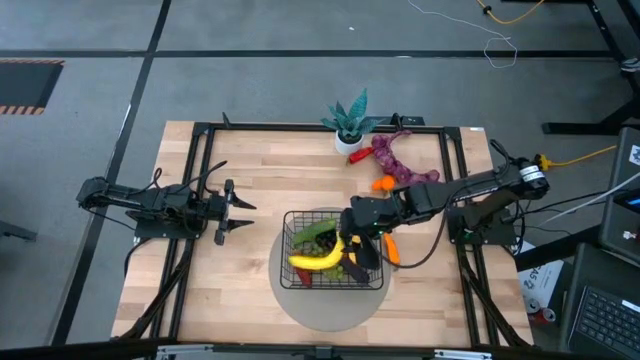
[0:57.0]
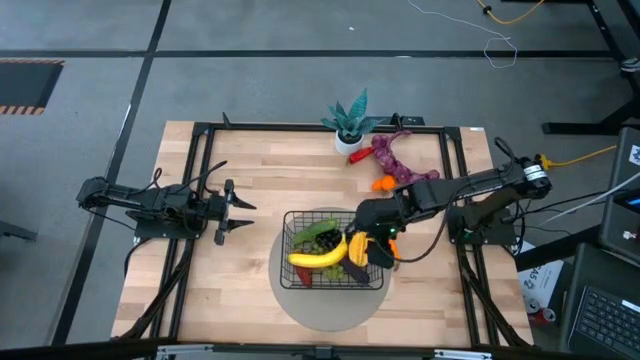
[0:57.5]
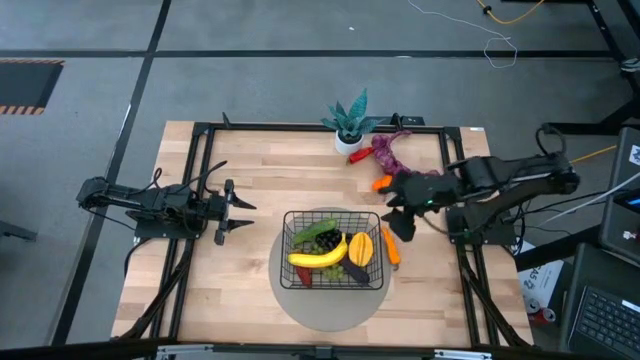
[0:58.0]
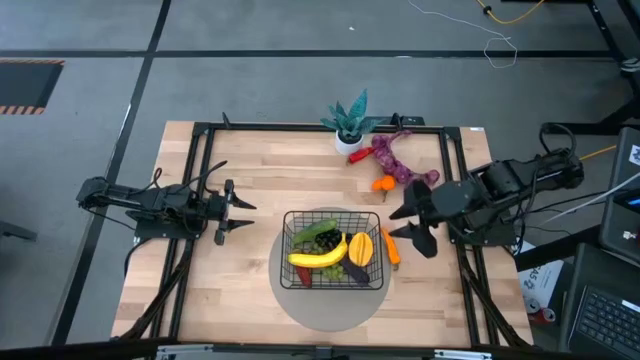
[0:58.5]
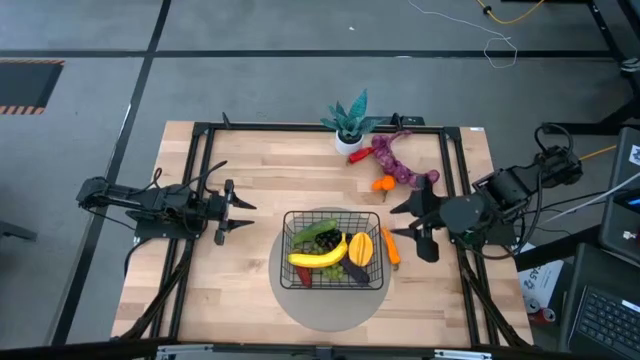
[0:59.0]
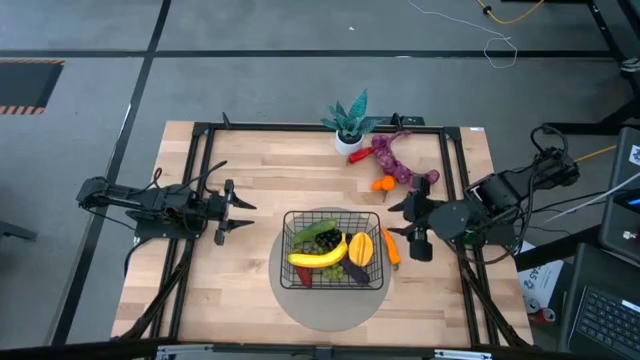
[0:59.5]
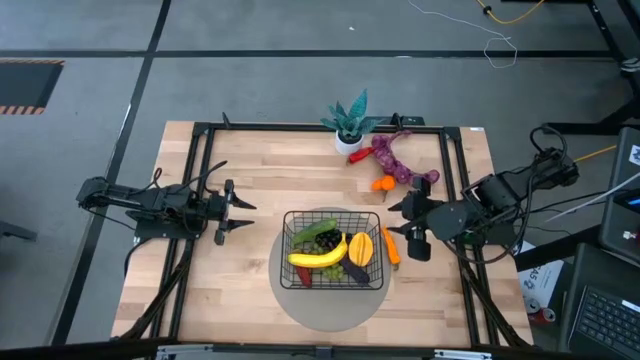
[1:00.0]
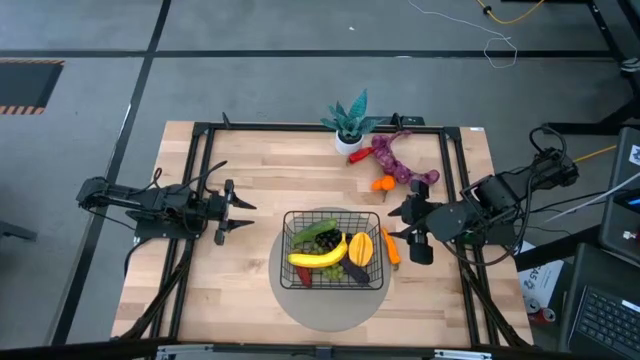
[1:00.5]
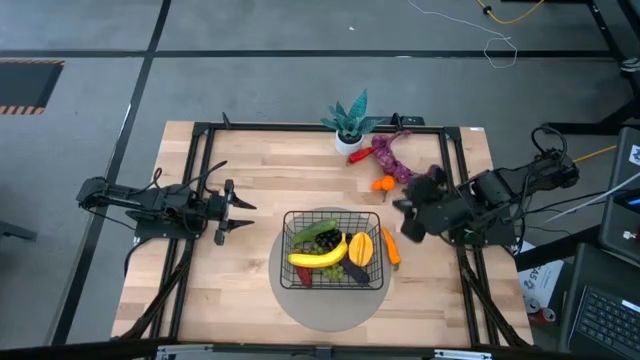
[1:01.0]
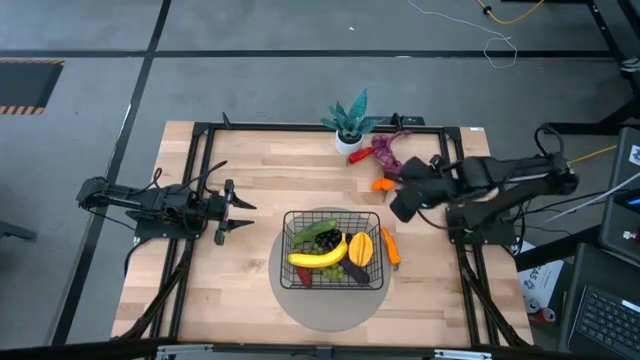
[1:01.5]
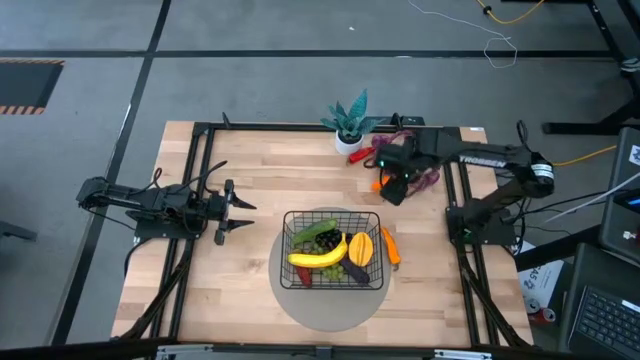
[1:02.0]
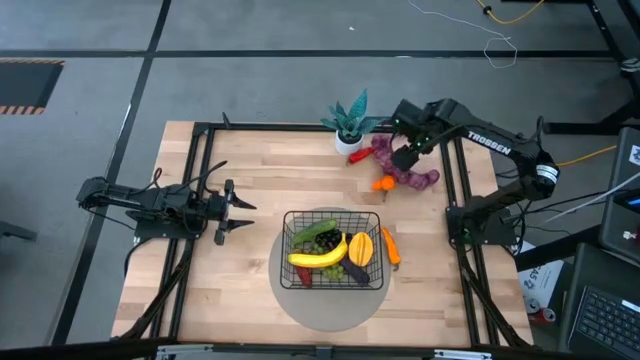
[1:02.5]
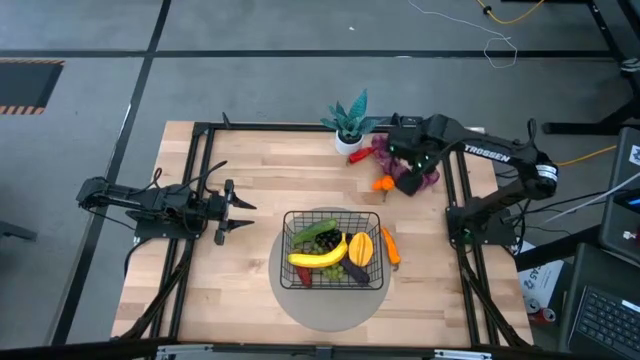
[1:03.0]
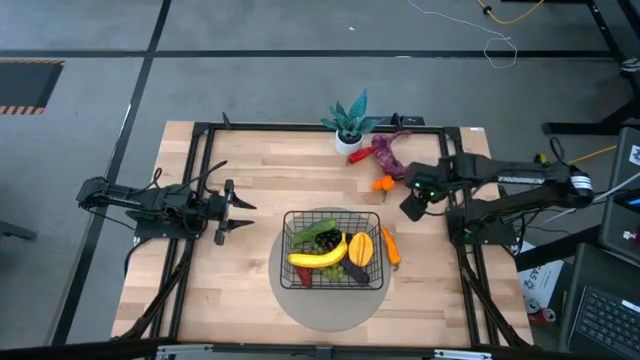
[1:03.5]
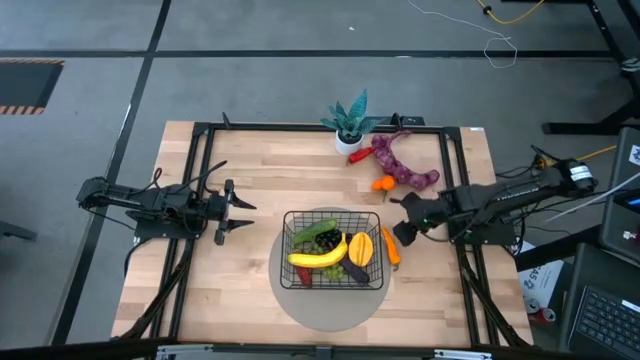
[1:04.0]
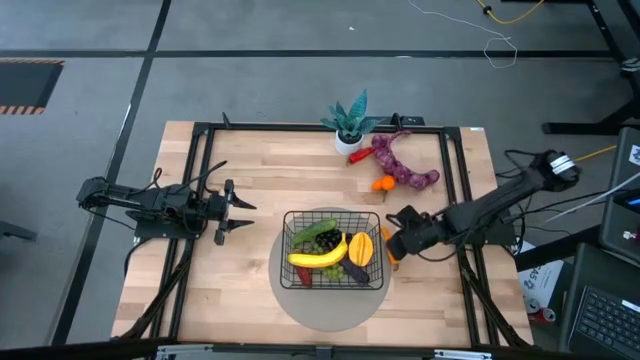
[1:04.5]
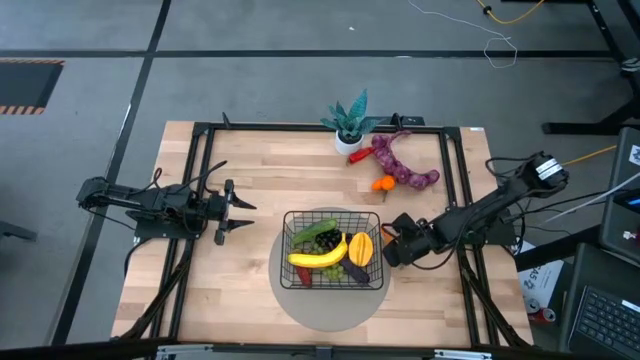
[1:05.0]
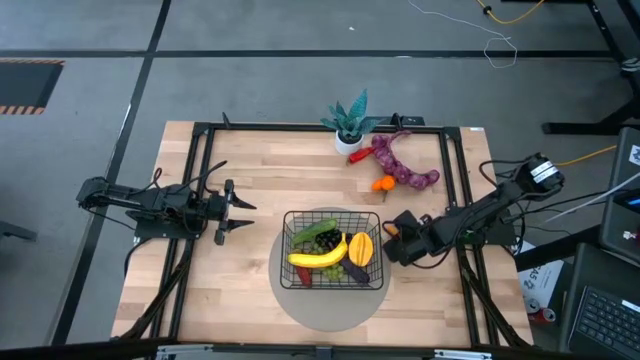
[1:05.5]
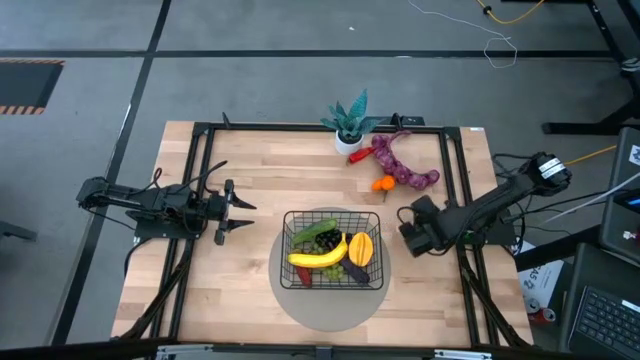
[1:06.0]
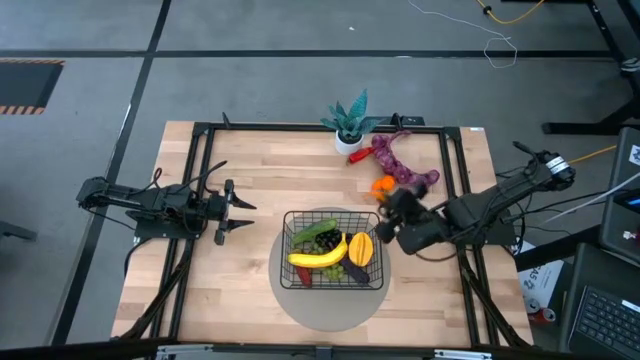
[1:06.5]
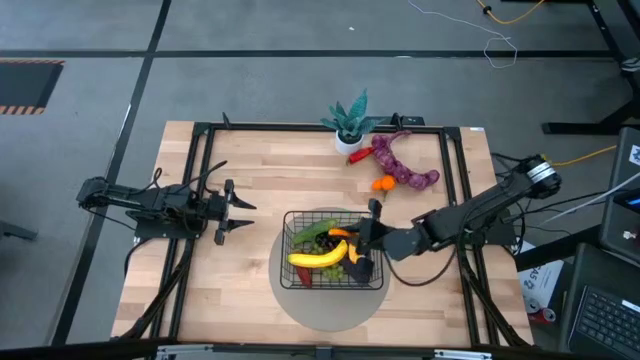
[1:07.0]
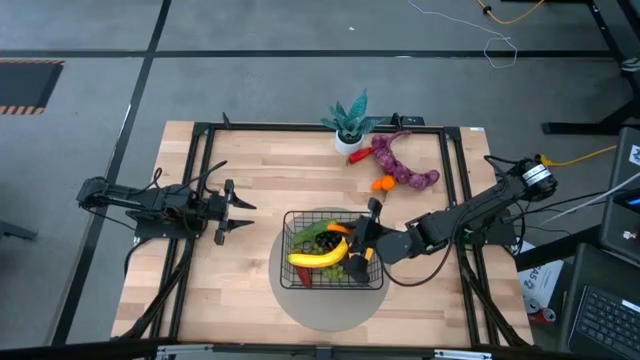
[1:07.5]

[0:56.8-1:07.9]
Task: Build produce basket
Put the orange chili pepper into the black wire basket

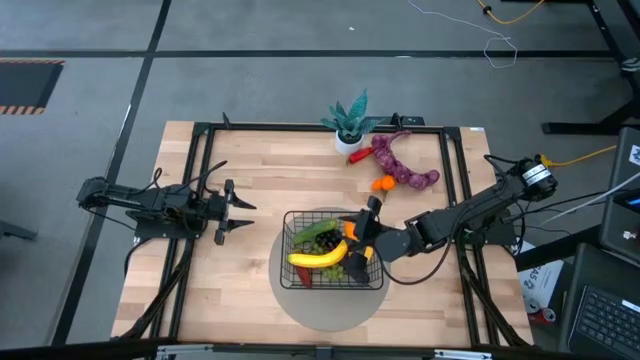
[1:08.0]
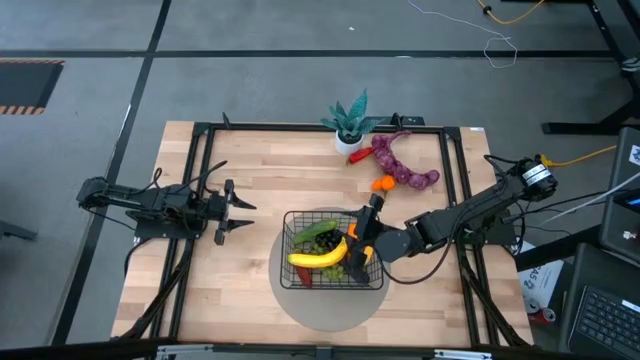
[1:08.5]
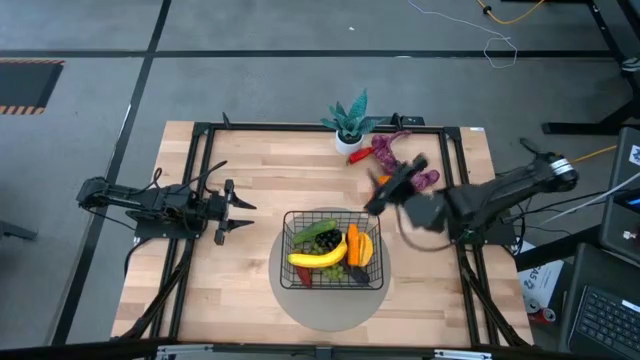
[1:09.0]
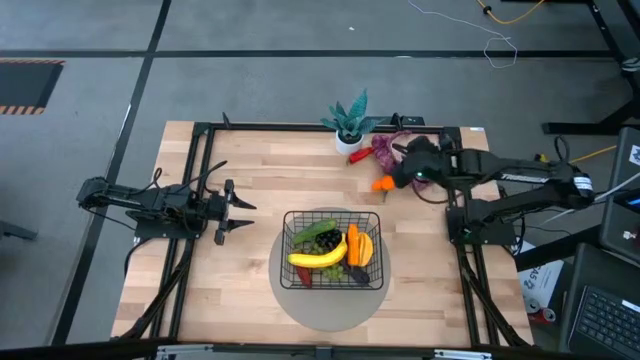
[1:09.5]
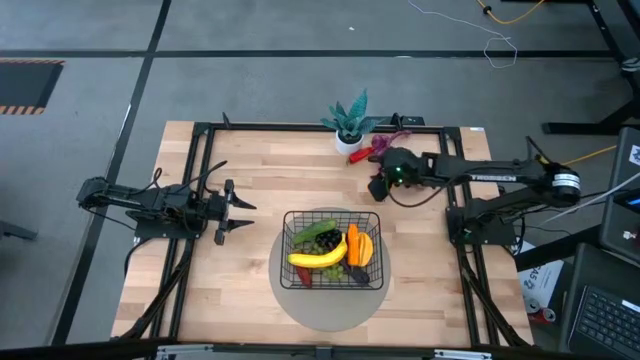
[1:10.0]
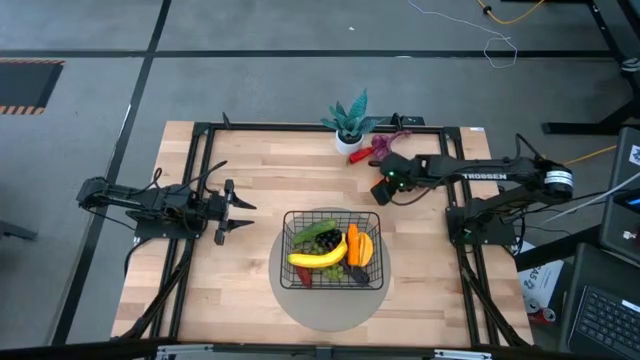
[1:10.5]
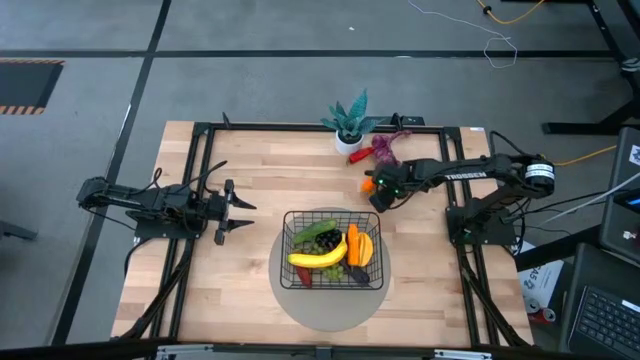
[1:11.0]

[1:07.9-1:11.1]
Put the orange tangerines into the black wire basket

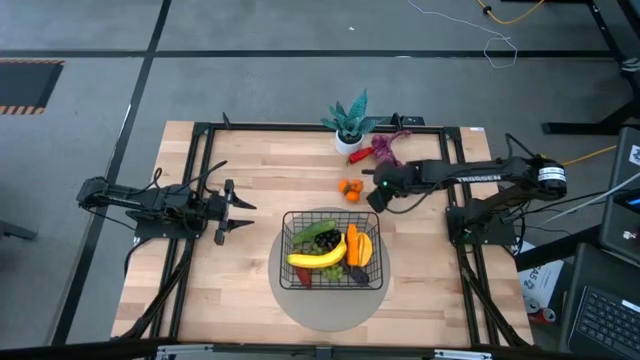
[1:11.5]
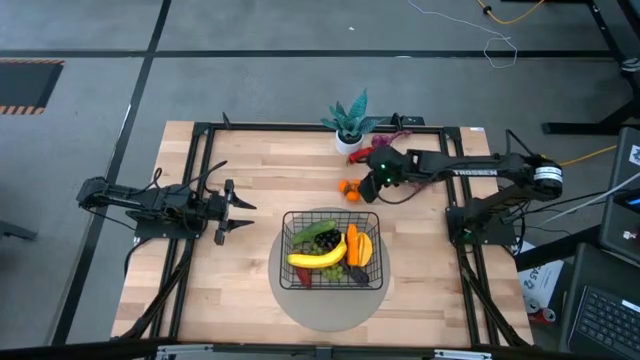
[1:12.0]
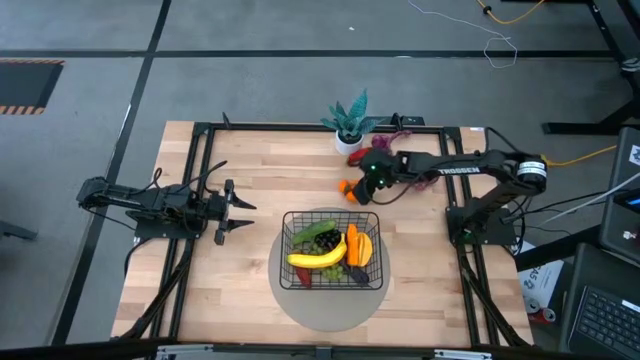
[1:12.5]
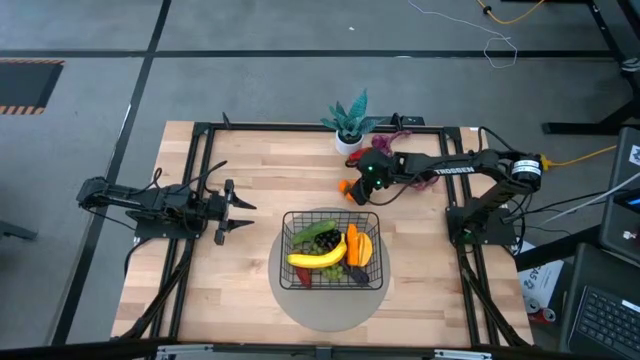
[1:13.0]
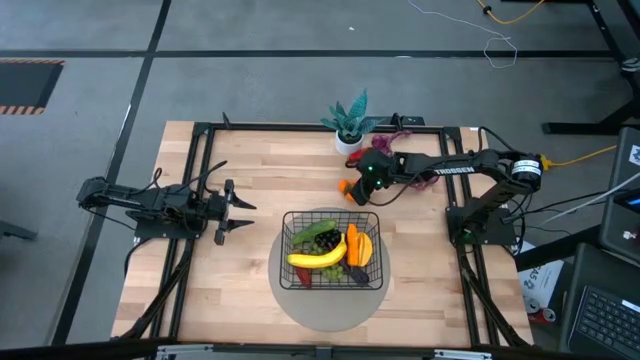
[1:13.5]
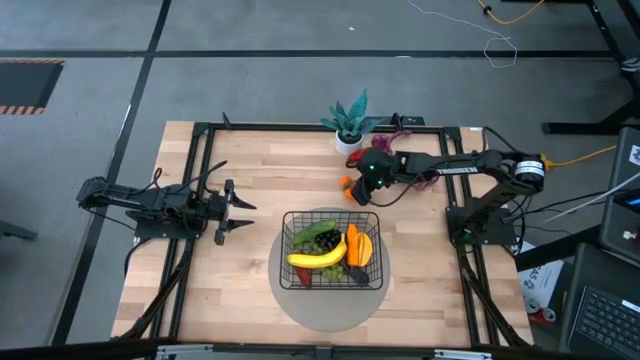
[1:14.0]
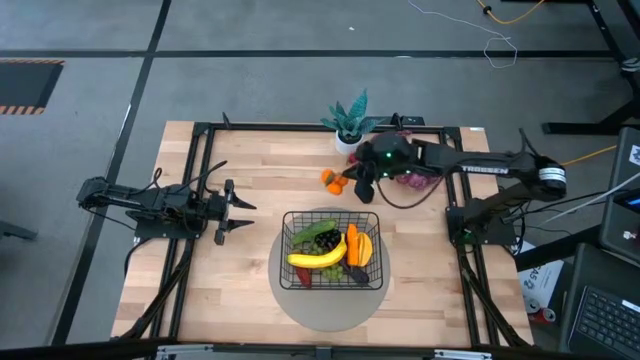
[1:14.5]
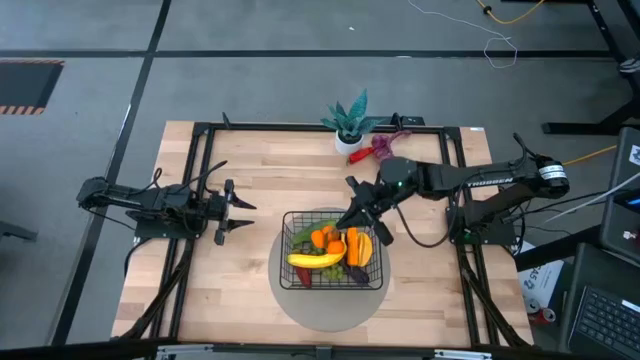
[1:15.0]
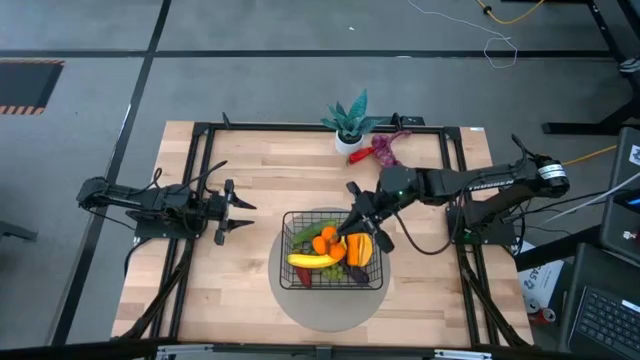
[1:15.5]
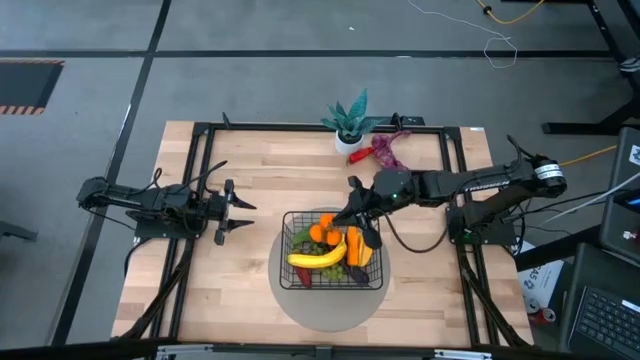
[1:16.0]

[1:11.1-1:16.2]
Put the orange tangerines into the black wire basket

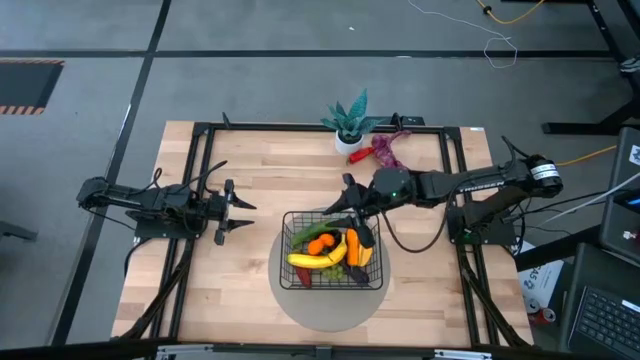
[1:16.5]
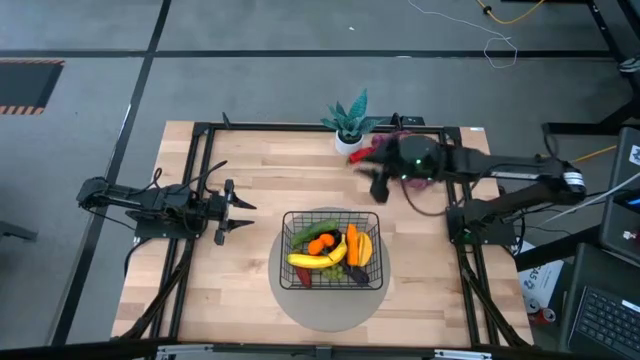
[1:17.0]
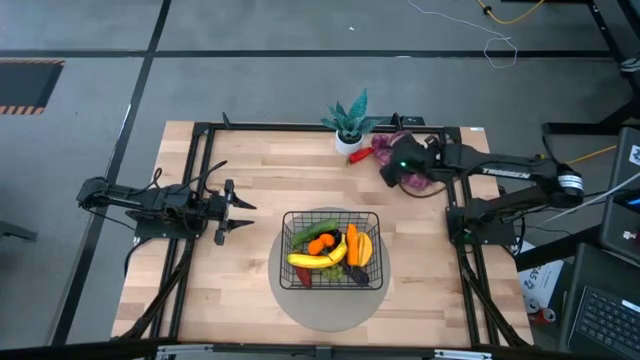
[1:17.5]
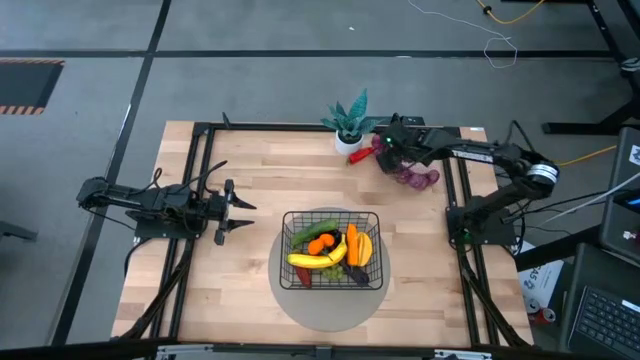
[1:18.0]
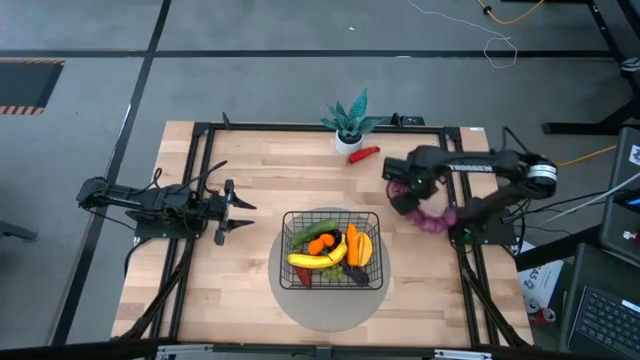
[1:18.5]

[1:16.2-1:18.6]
Adjust the purple garlic on the table
